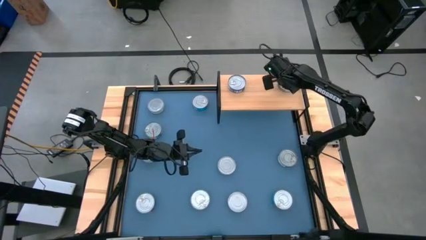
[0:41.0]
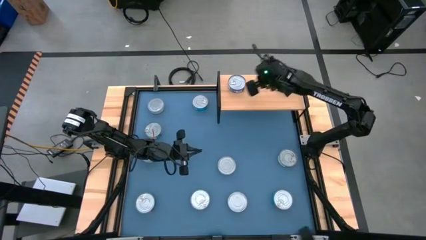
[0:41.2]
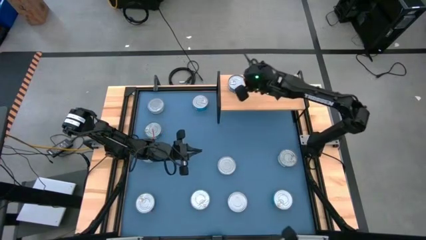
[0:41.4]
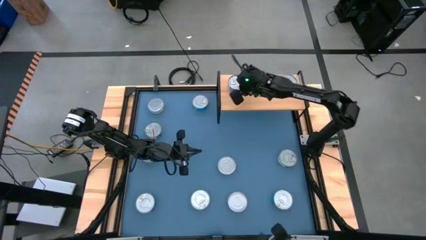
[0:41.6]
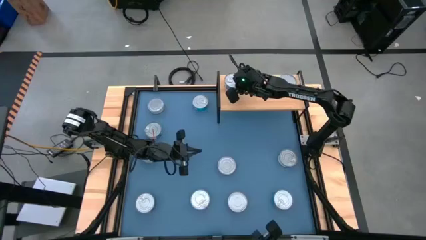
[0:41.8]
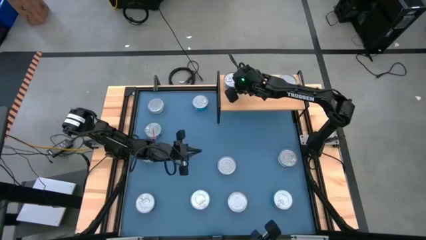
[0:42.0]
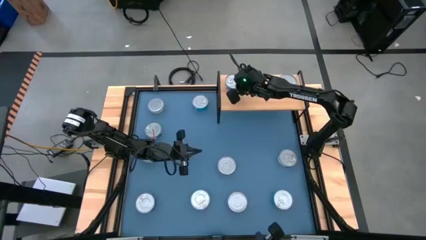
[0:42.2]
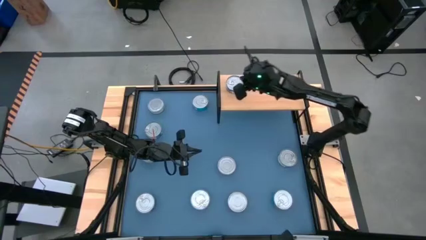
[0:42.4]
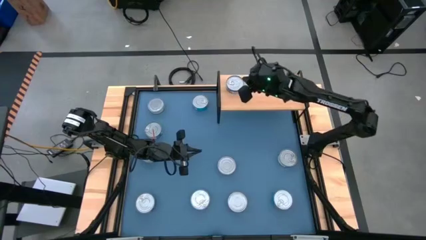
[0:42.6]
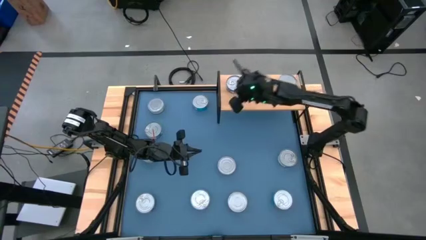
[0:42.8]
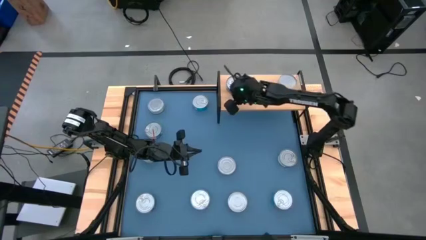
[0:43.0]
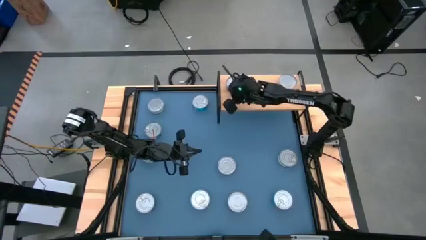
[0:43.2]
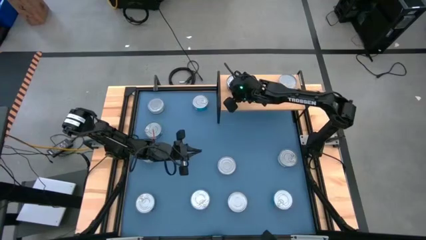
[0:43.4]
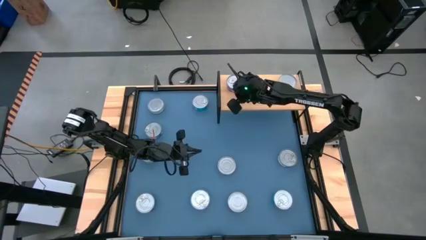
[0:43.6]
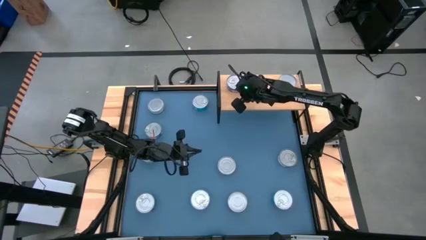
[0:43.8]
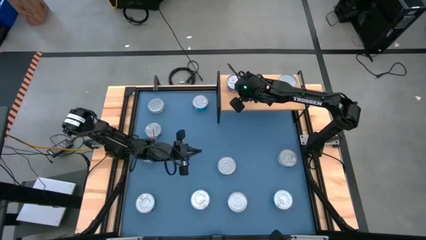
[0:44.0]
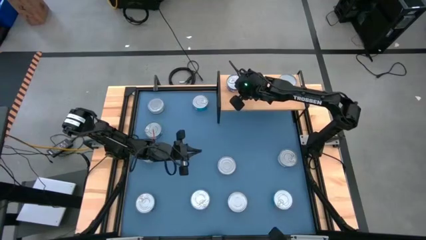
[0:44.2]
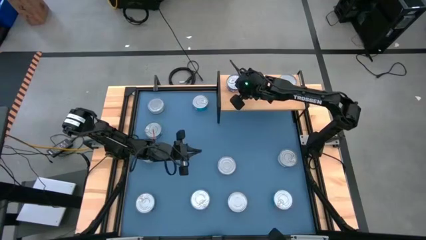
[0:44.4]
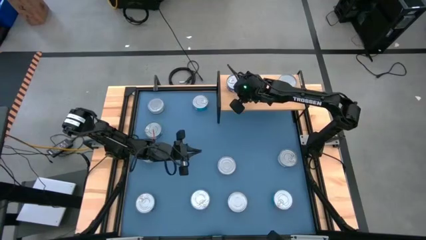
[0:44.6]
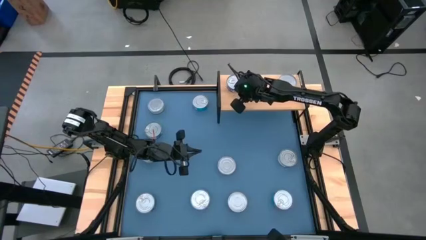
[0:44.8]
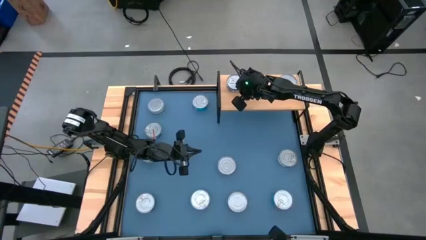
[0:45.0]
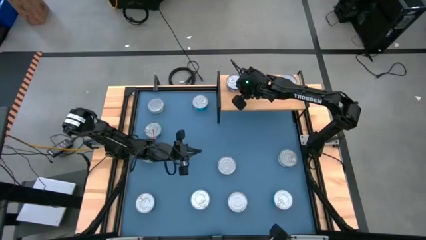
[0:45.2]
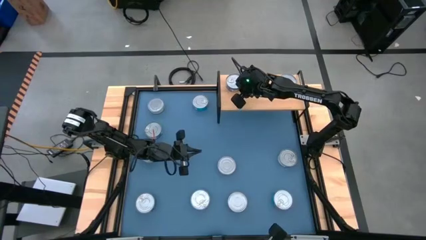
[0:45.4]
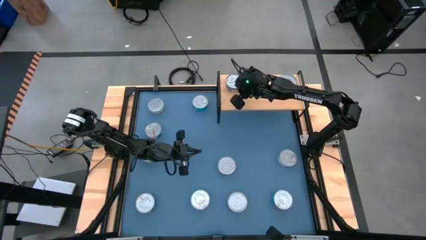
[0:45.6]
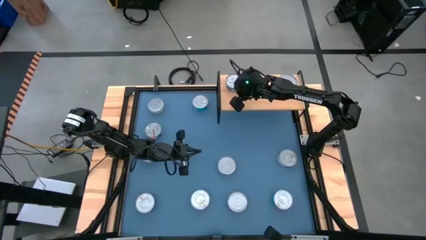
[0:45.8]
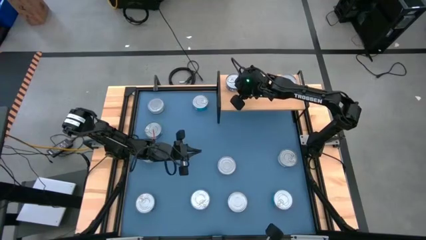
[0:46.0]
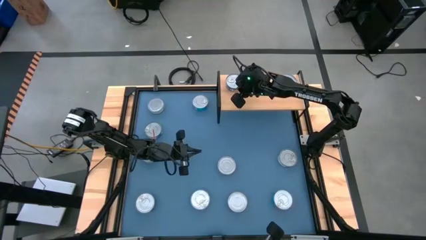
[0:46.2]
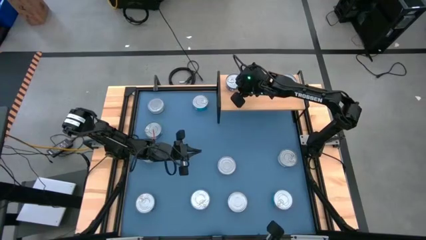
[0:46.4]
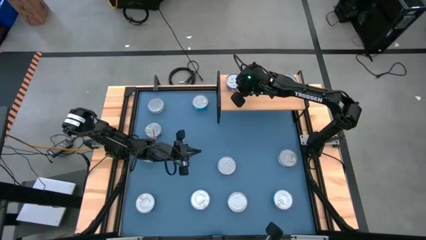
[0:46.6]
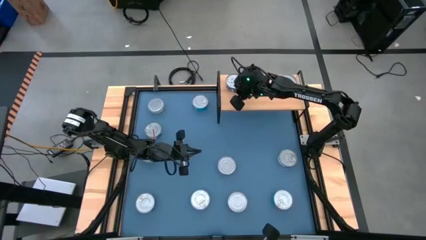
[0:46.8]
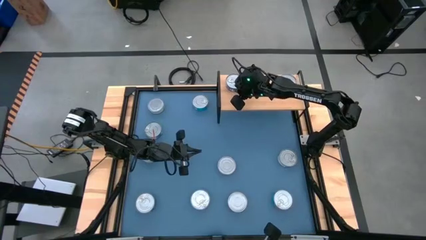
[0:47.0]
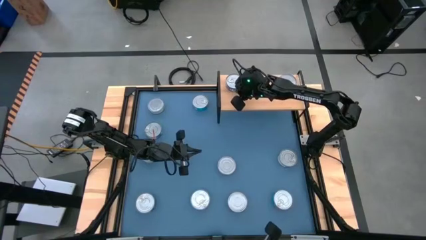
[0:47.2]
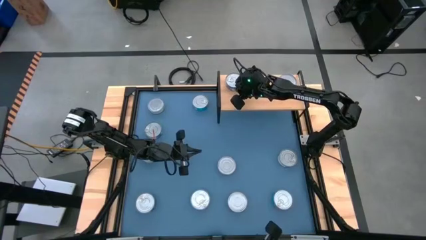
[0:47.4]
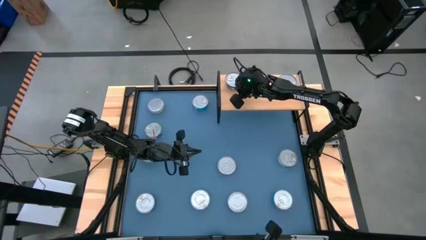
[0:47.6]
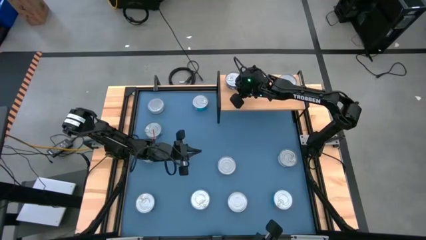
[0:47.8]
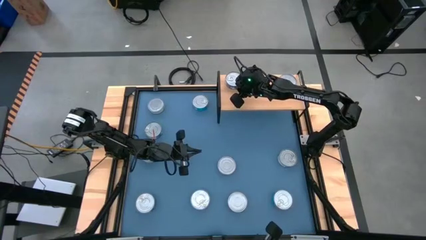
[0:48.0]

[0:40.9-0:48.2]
Task: Stack canned seafood by type on shelf
Adjust the blue tuna can on the shelf

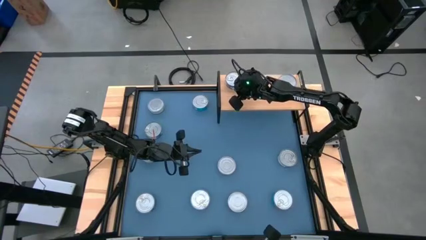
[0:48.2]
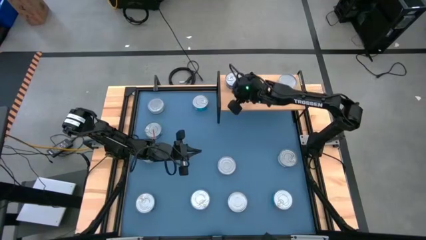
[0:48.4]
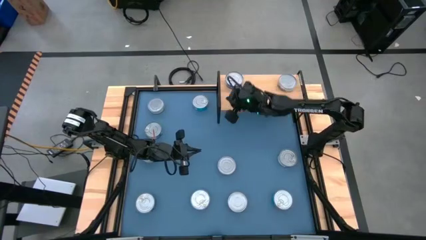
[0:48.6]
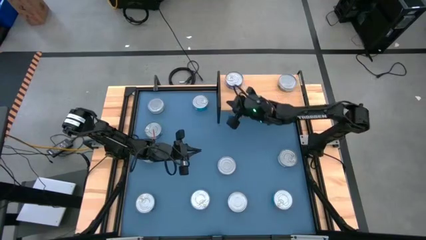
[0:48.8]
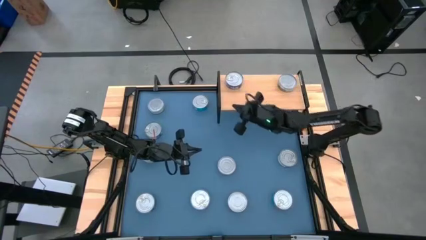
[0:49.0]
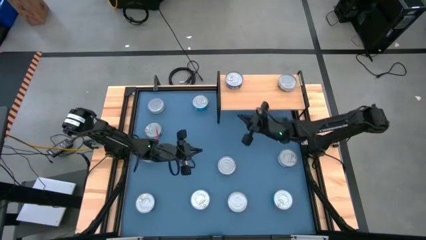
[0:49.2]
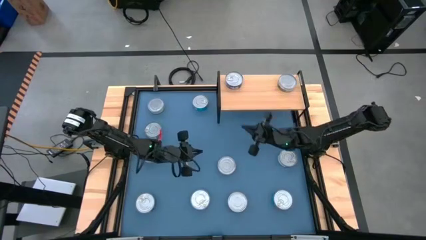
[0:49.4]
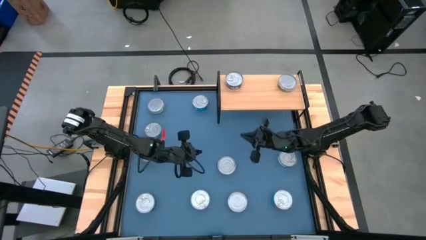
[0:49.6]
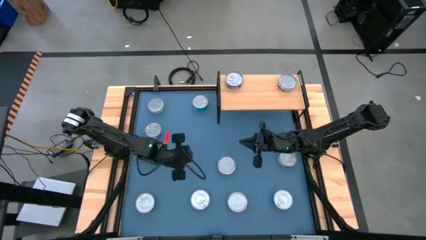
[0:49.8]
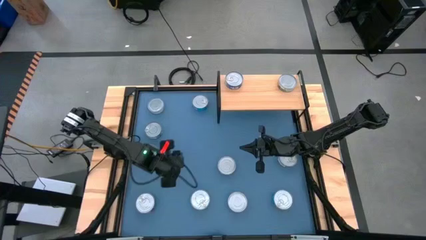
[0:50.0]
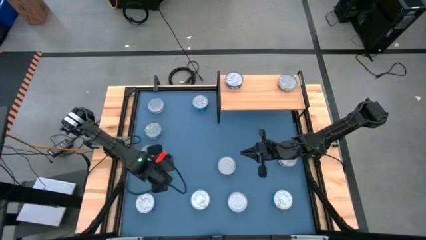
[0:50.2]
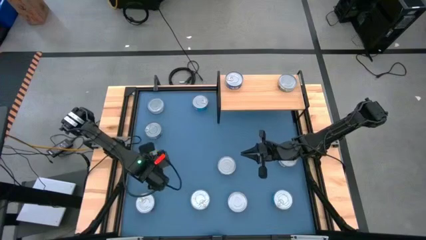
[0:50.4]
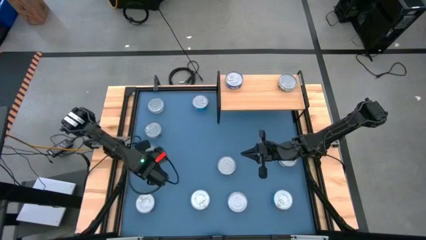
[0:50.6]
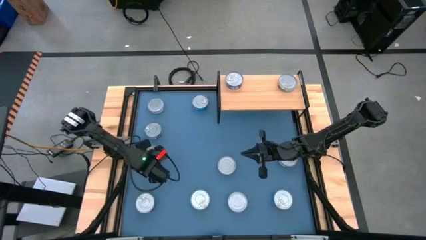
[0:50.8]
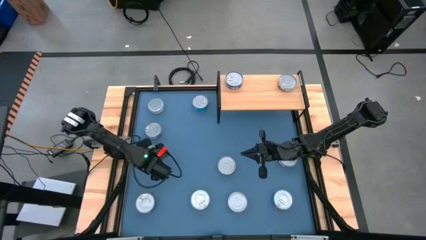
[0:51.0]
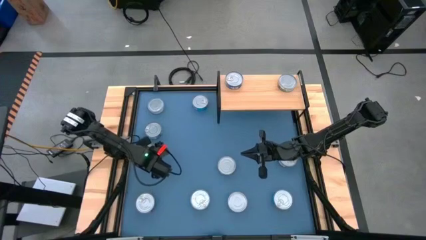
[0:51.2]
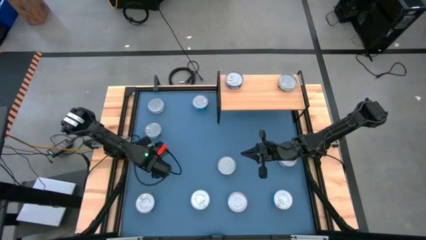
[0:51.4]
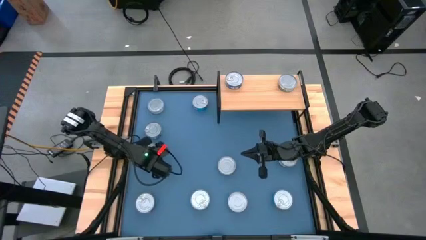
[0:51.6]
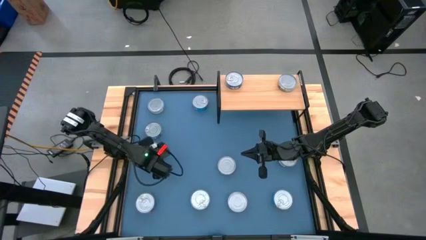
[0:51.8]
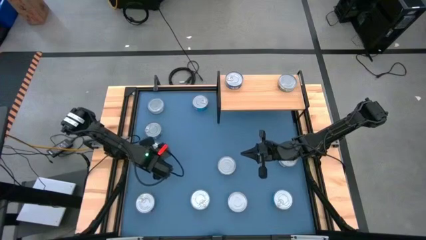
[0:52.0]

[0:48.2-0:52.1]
Put the center left yellow-blue tuna can on the shelf

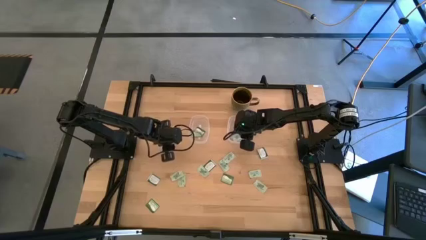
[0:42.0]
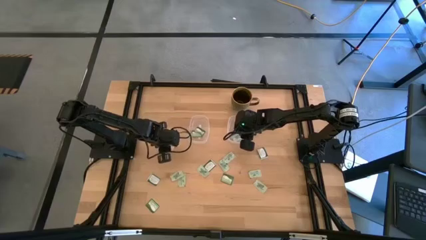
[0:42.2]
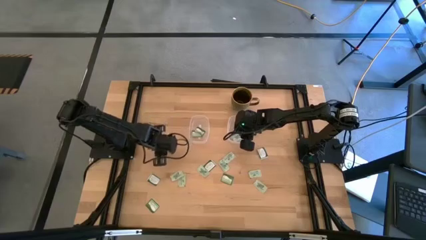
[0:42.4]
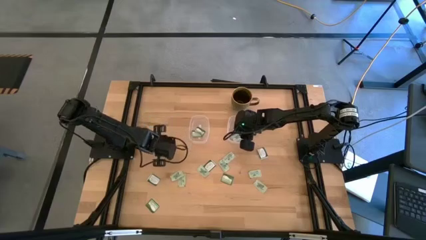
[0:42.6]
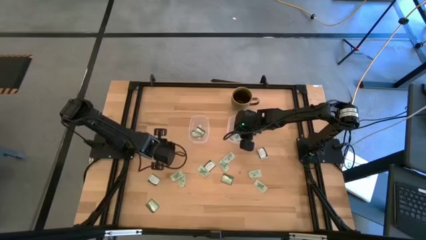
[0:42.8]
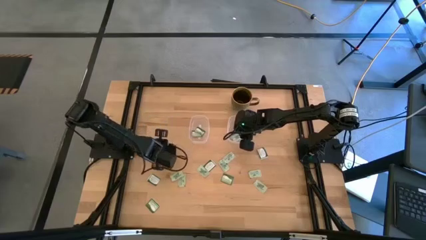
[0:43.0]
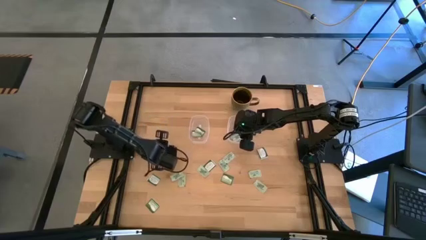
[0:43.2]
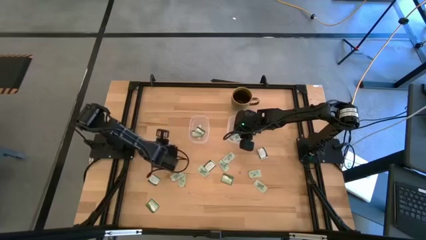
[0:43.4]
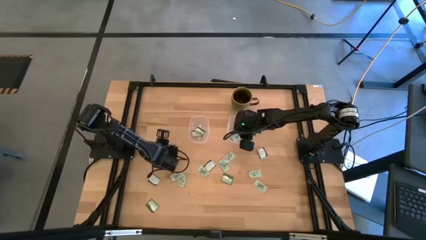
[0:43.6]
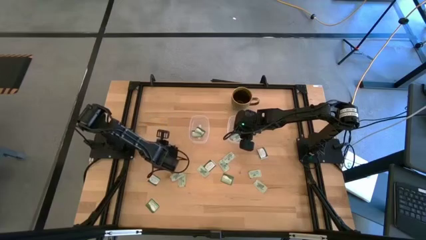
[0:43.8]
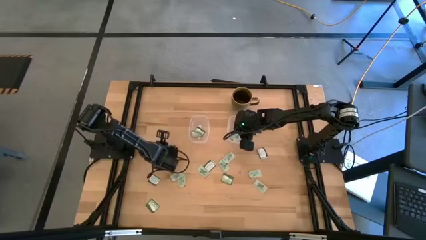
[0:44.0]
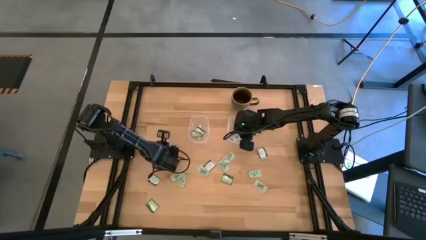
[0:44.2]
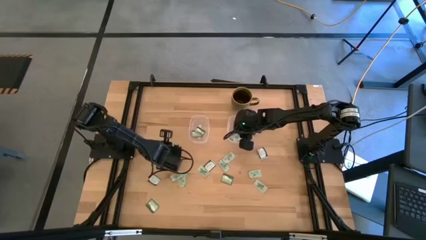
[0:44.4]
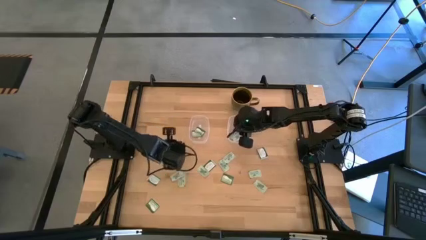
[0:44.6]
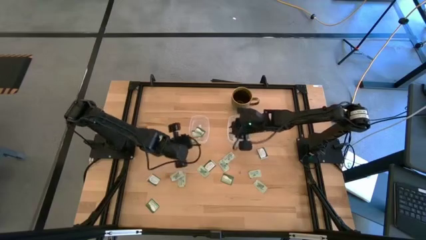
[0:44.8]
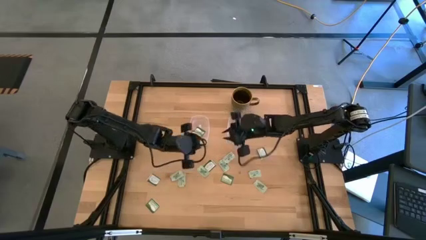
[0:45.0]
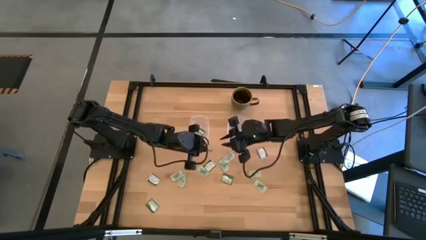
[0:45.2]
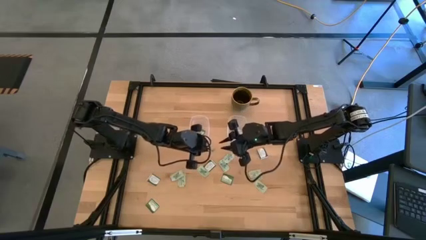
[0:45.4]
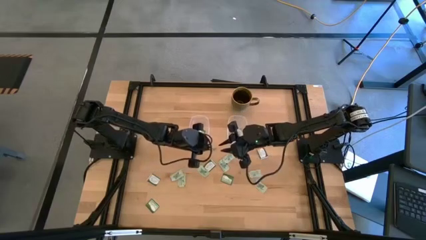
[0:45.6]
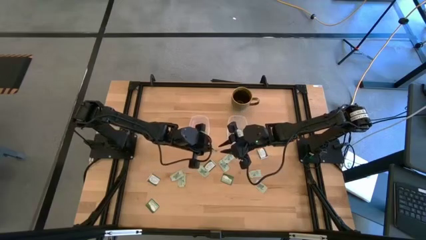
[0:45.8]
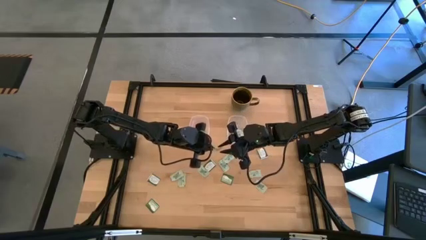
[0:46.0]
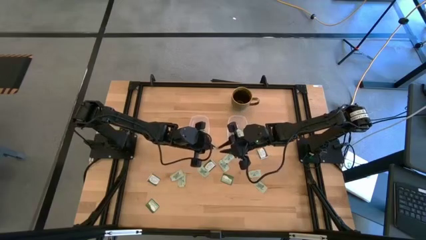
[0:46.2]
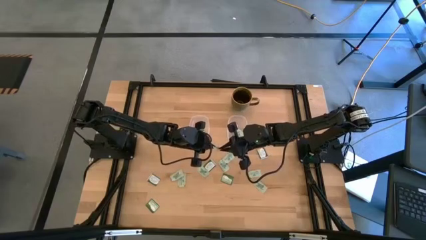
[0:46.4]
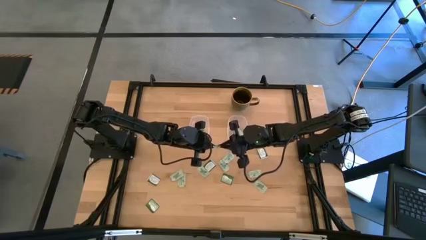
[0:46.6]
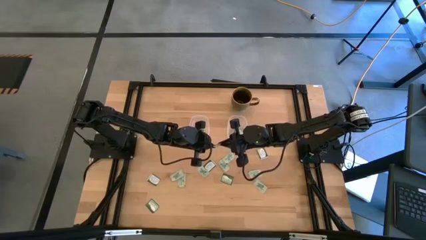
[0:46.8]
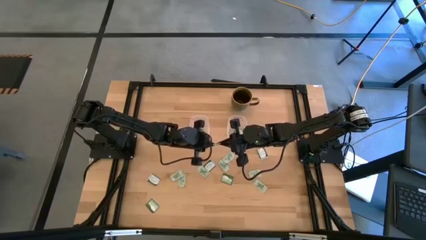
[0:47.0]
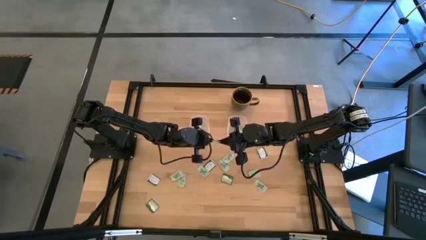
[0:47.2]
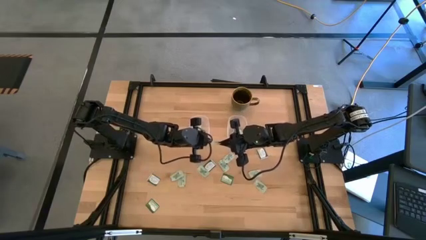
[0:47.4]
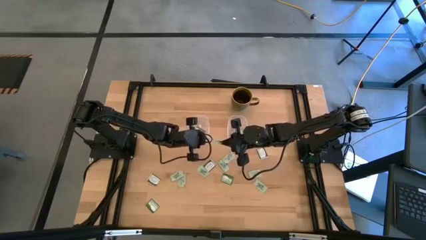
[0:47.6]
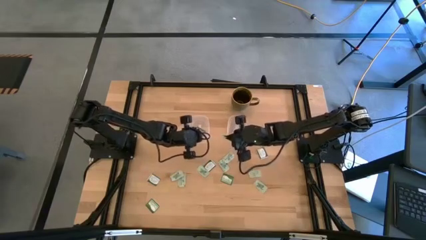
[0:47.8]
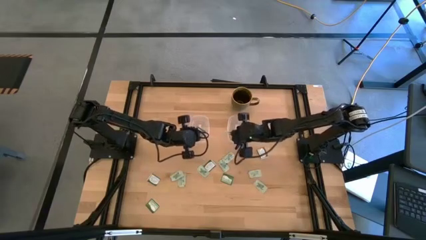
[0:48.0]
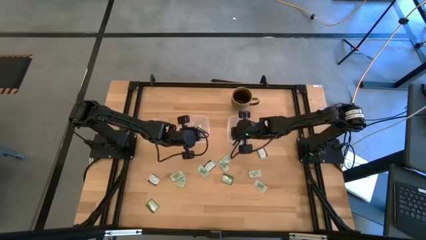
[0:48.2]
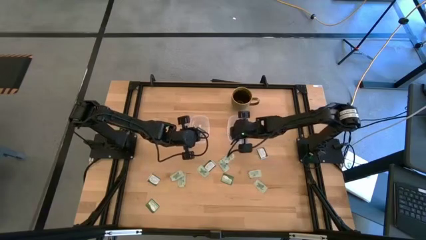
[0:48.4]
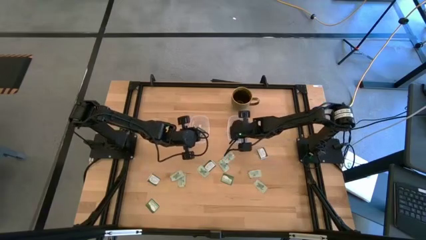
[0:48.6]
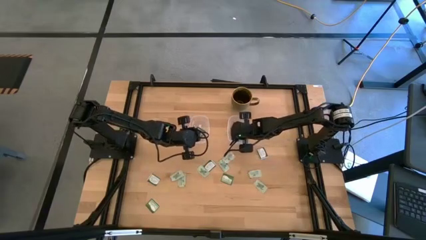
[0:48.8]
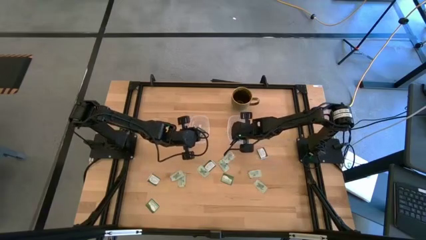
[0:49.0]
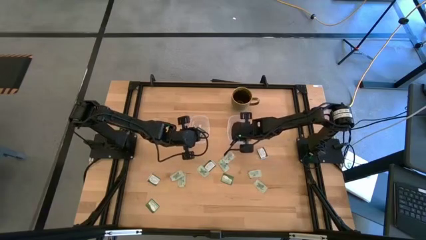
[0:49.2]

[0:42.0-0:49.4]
Task: Pick and place items into bin
Put the stevia packet into the right transparent bin
